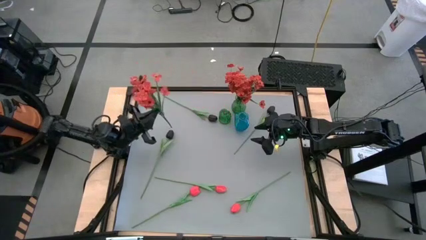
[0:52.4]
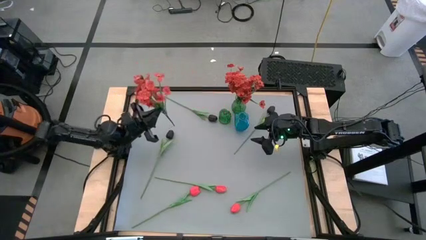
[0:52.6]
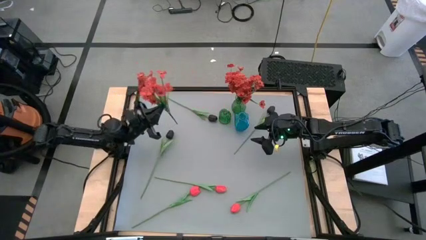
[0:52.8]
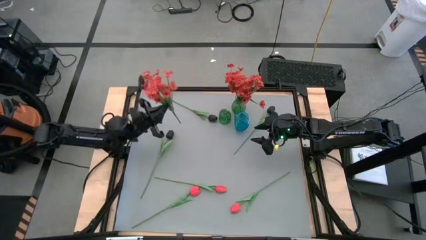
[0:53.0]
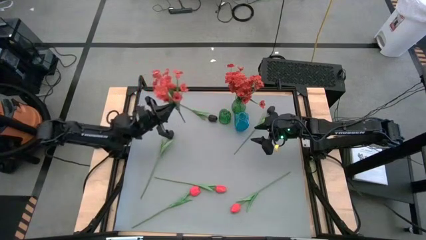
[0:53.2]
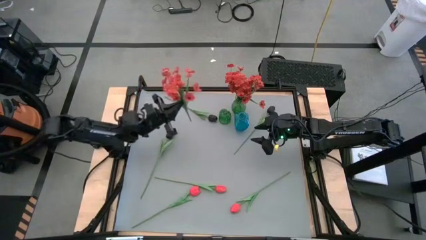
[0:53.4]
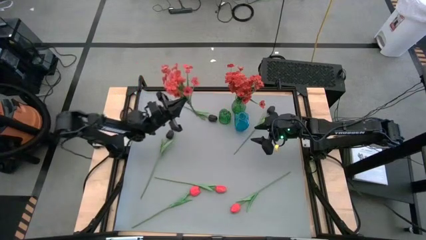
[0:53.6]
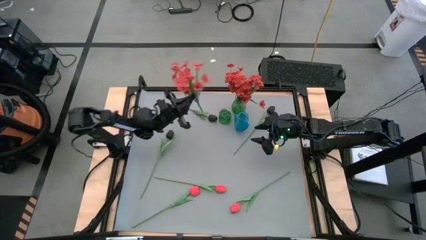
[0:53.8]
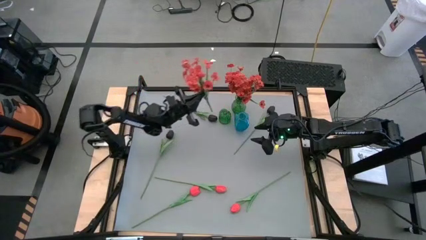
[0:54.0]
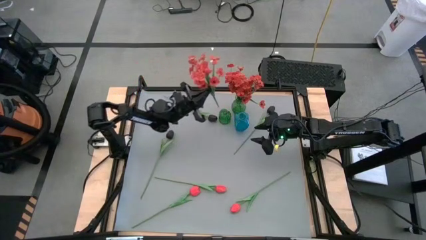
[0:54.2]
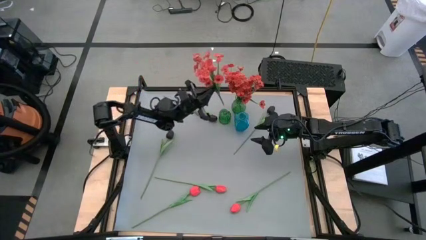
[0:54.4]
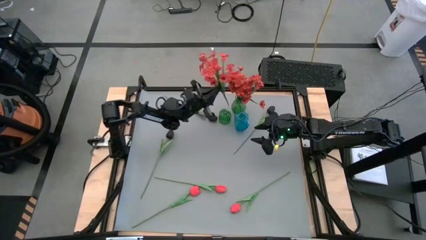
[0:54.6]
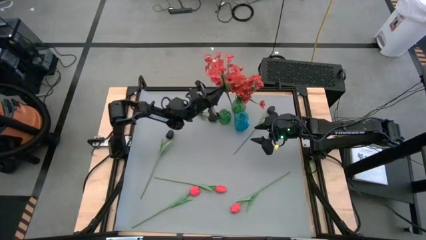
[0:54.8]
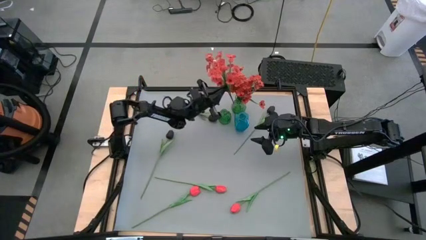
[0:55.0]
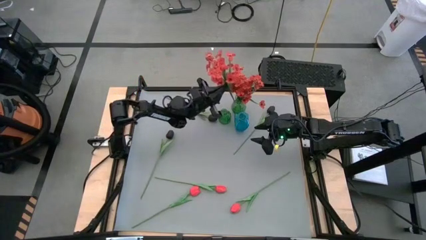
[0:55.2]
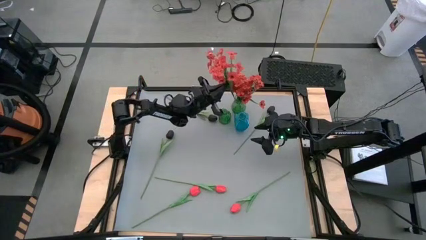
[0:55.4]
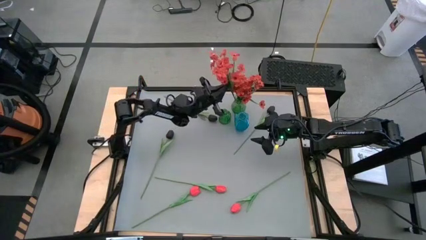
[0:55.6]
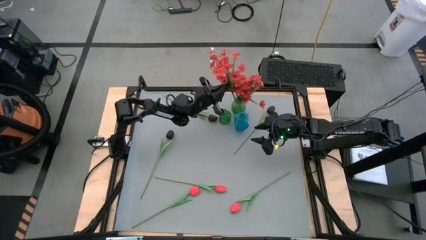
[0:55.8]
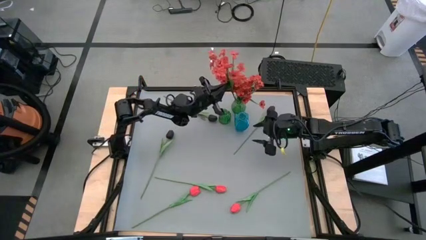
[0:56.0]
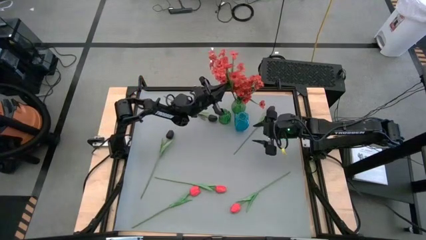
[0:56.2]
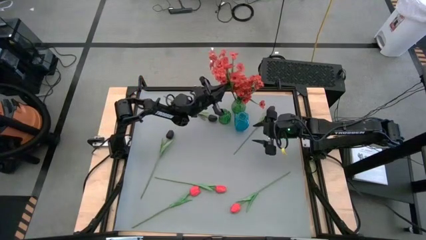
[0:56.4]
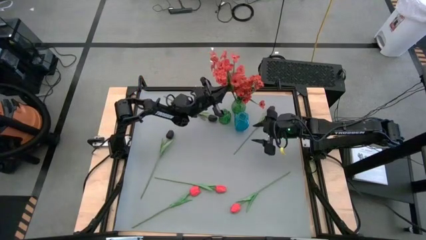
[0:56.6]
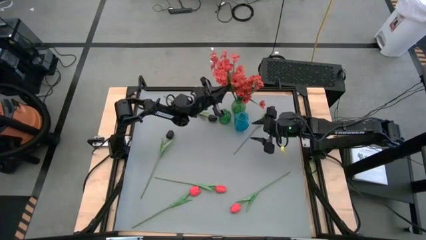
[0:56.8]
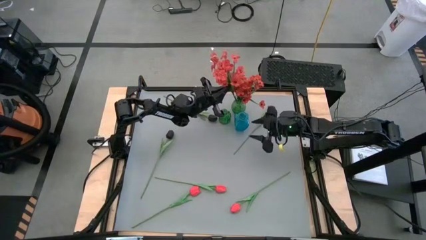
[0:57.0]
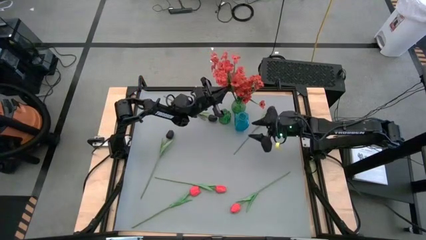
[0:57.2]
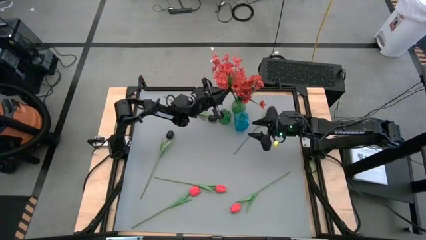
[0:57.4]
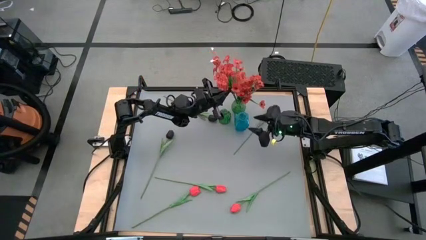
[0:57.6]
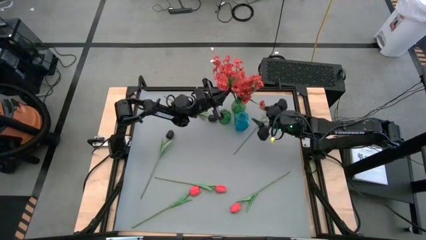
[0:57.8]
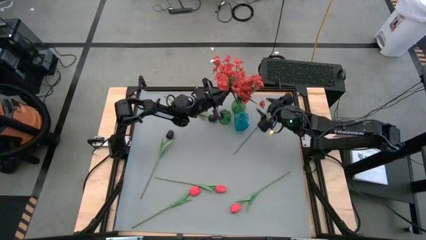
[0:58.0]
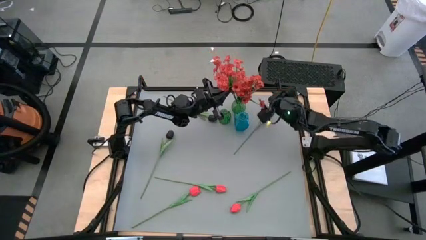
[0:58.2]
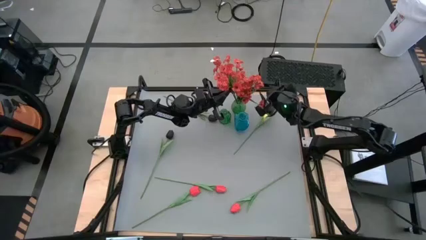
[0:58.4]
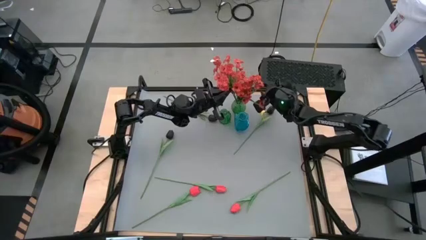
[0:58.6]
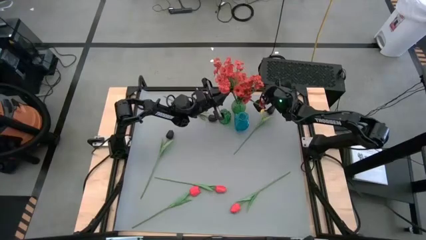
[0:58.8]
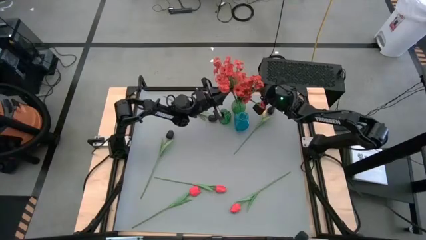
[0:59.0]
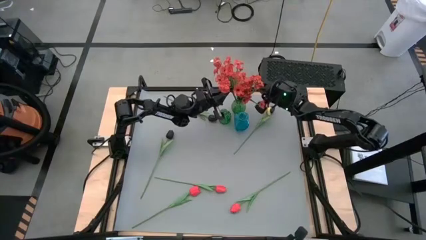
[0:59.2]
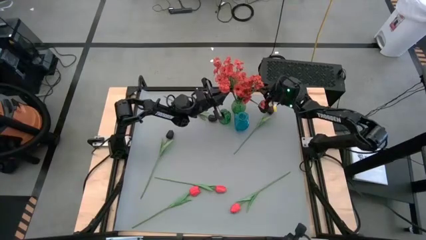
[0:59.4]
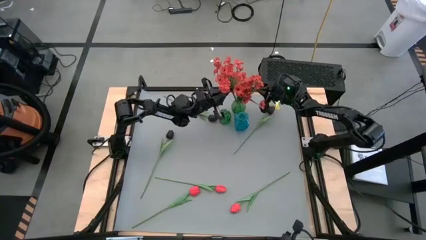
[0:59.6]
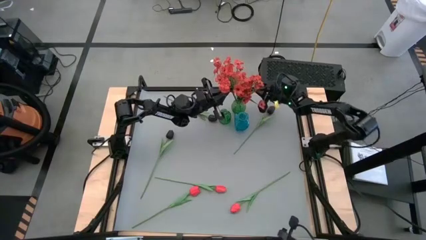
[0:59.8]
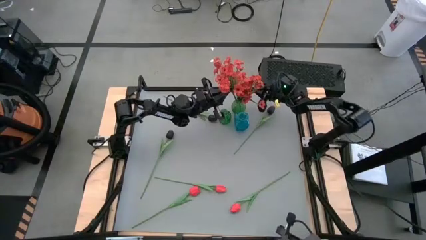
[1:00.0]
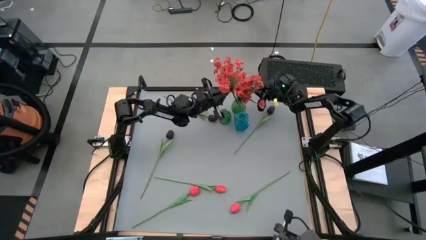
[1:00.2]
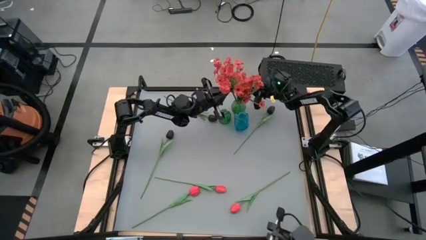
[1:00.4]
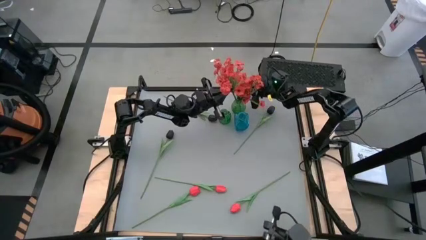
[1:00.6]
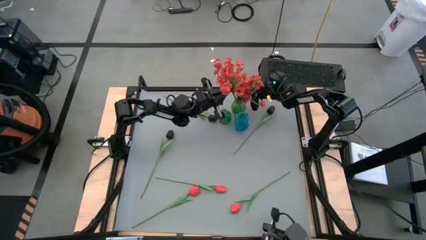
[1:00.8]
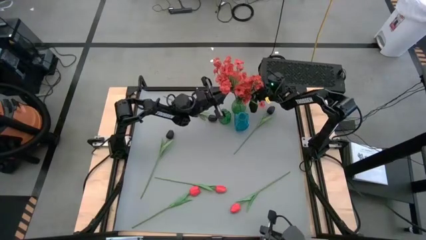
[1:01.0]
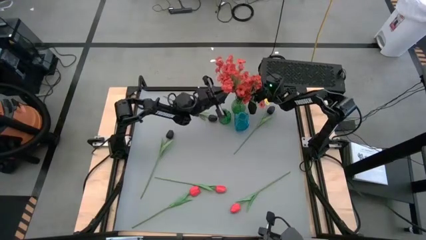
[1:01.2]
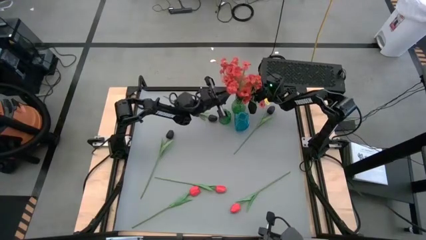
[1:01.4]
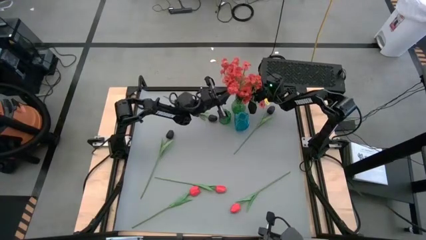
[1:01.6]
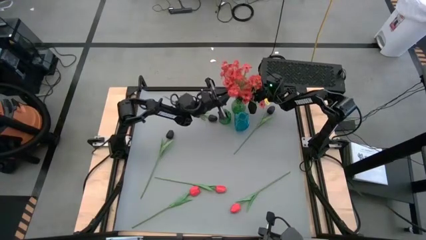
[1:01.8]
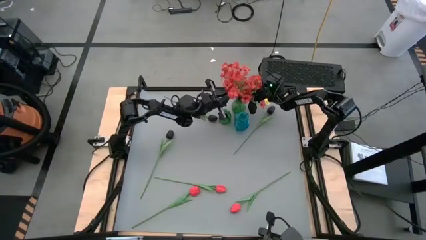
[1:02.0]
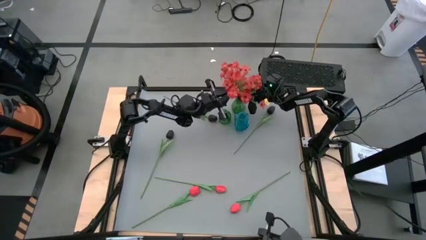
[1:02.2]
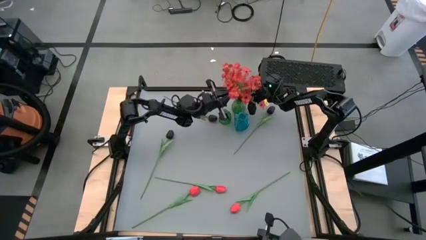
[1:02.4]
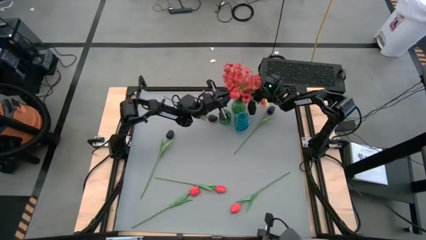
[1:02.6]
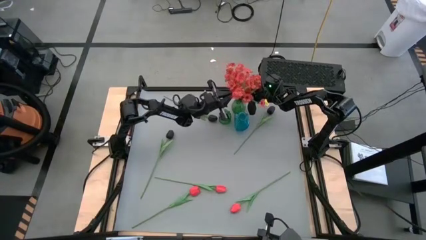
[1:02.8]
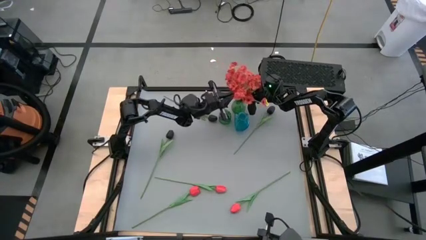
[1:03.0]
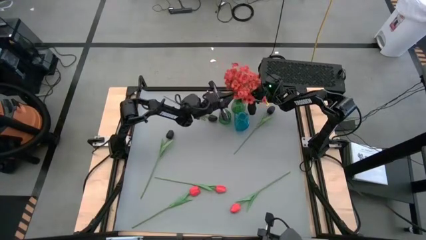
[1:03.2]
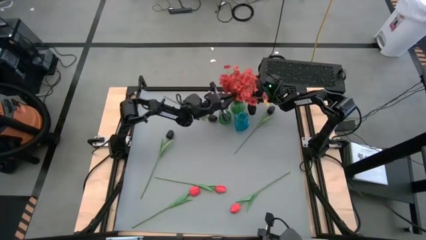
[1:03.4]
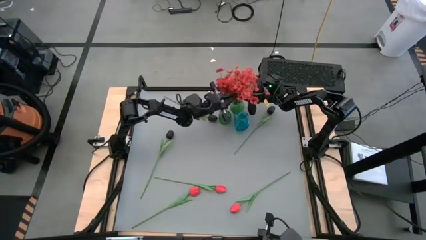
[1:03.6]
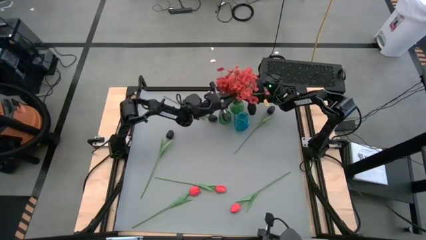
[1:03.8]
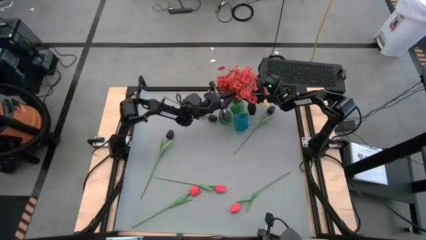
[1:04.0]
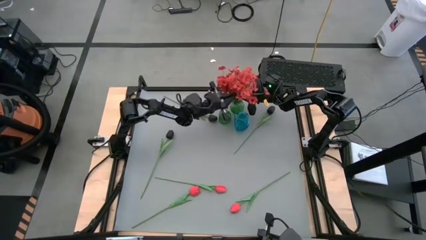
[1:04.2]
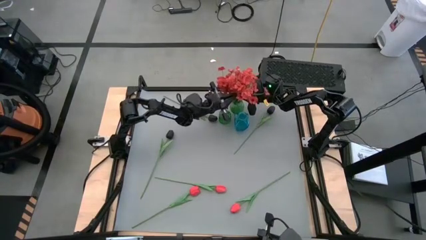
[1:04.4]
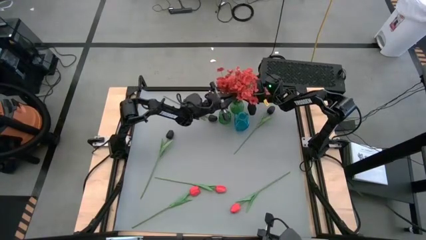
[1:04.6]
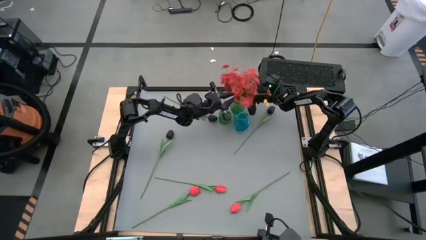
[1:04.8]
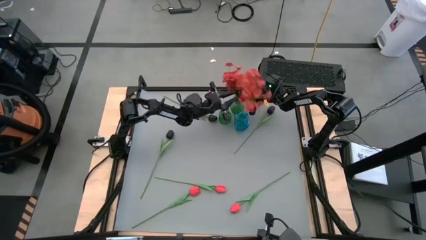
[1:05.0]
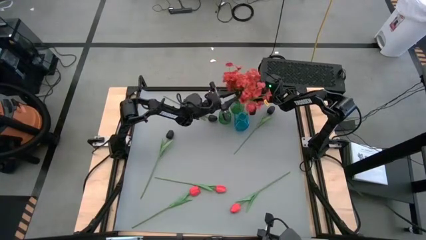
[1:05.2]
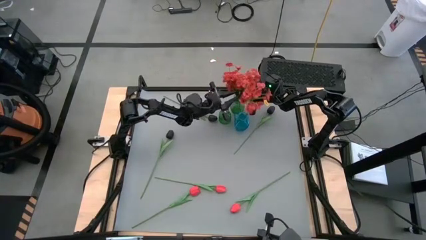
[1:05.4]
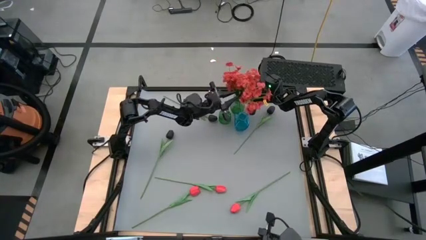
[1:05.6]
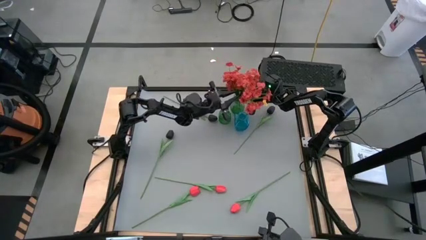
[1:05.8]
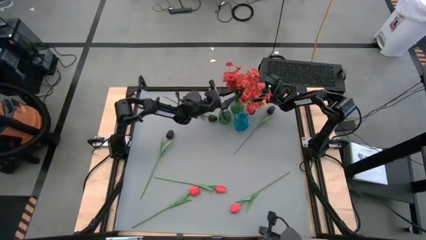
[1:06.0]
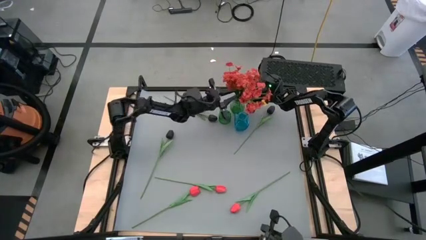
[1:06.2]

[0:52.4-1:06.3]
Task: Sort flowers into vase by color
Put the red flowers into the top green vase

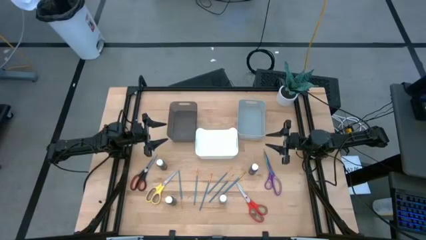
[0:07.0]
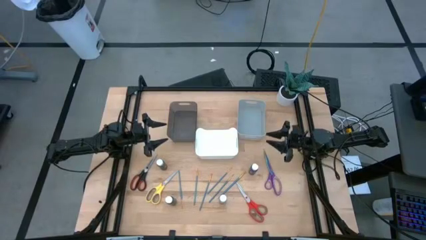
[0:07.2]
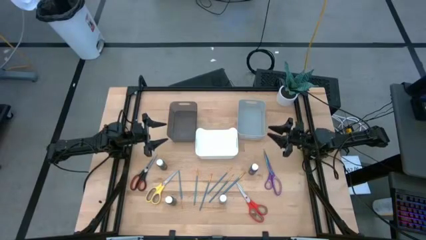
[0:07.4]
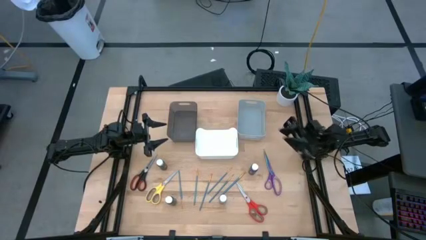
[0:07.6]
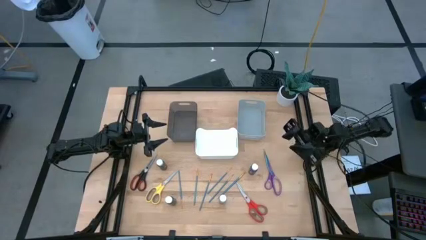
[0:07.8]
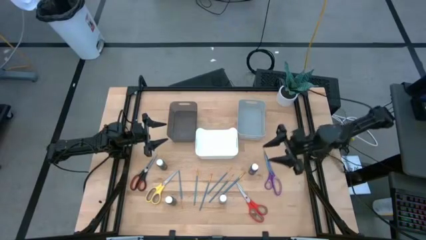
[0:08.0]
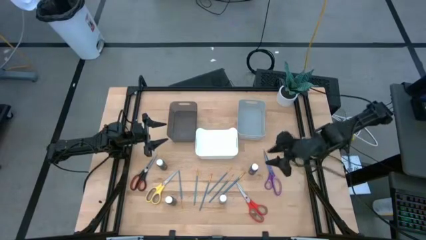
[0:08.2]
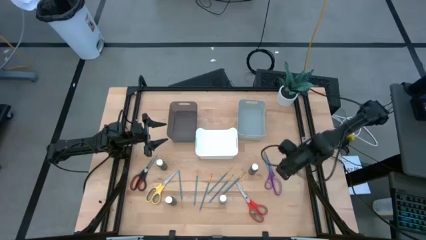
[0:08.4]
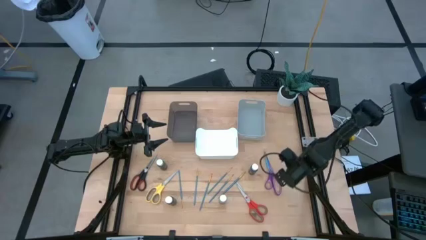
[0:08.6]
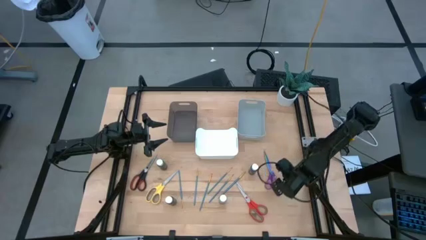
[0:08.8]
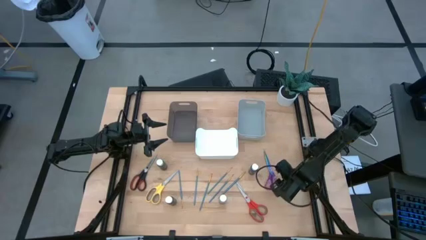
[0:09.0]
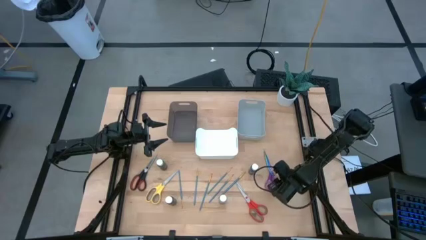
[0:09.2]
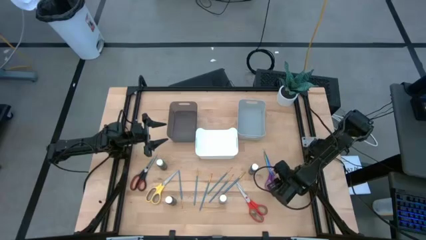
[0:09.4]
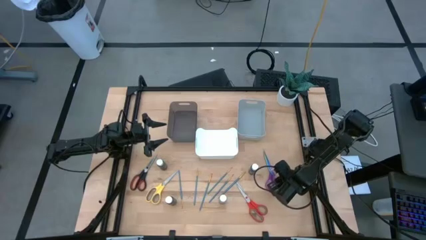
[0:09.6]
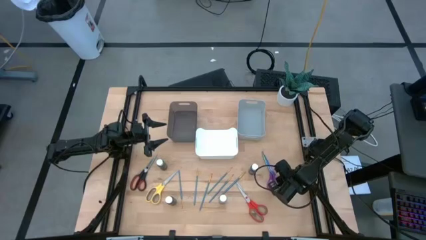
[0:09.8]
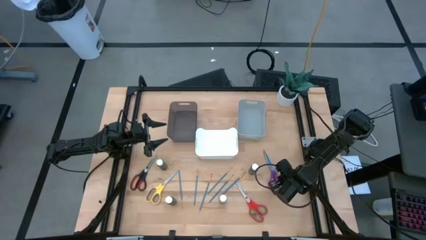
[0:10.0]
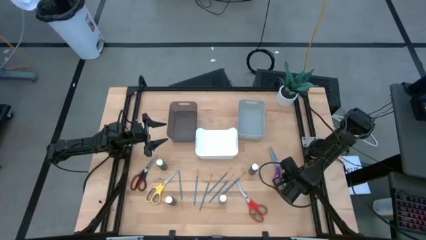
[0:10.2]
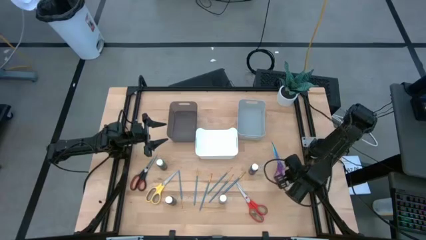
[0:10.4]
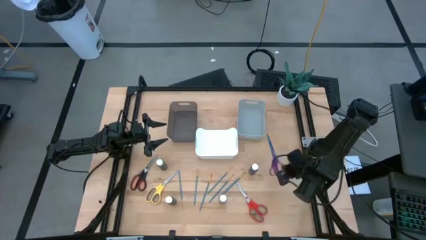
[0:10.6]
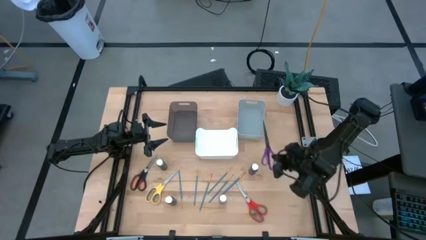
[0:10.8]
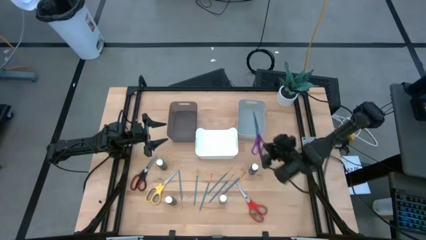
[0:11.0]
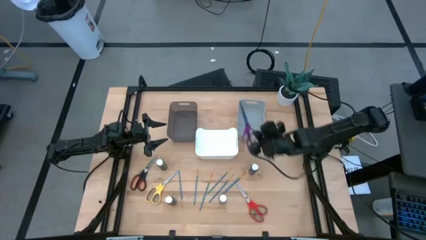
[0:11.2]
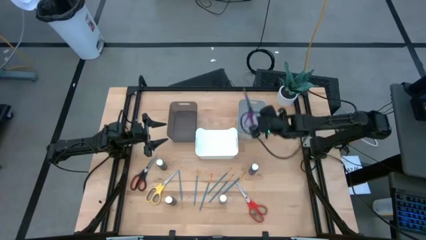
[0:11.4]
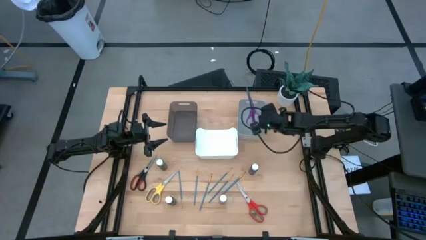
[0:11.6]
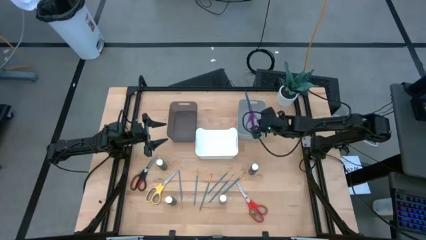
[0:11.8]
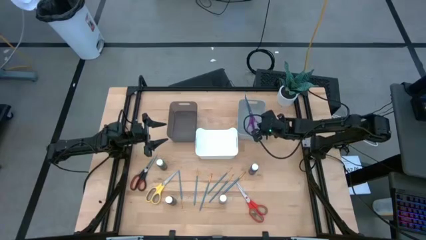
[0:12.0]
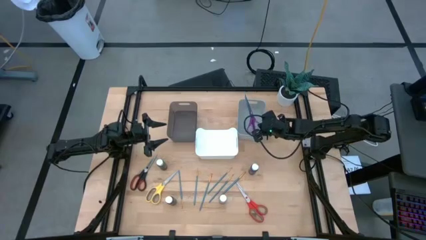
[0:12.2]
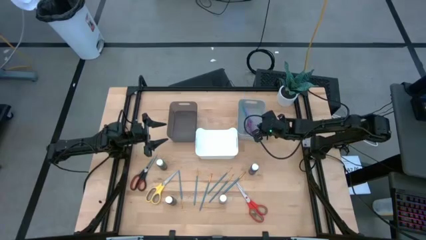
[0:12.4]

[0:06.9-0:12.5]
Task: Pick & Place Paint Supplies
Put the purple scissors into the gray bin
